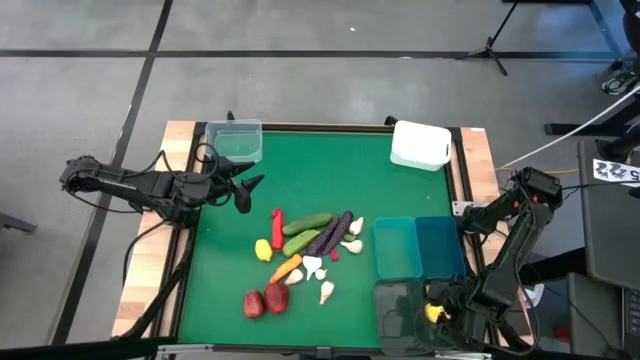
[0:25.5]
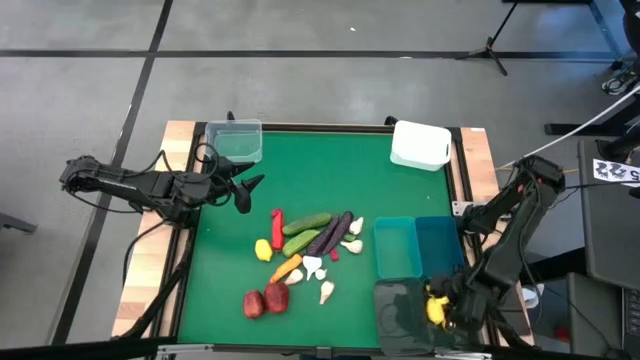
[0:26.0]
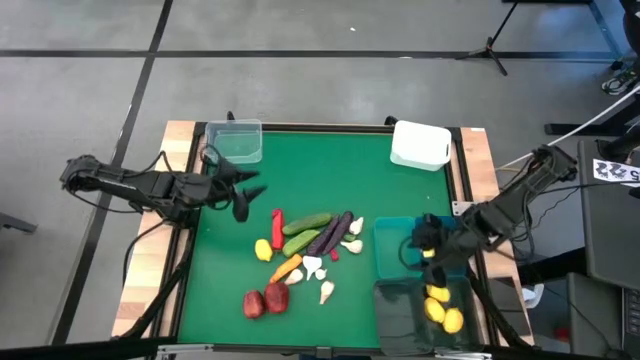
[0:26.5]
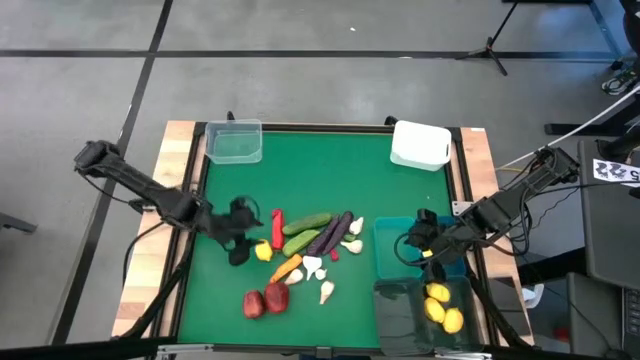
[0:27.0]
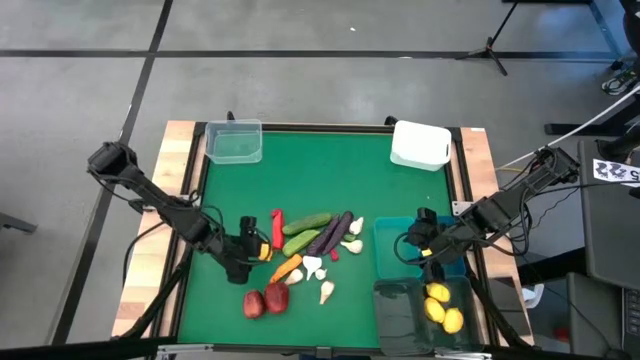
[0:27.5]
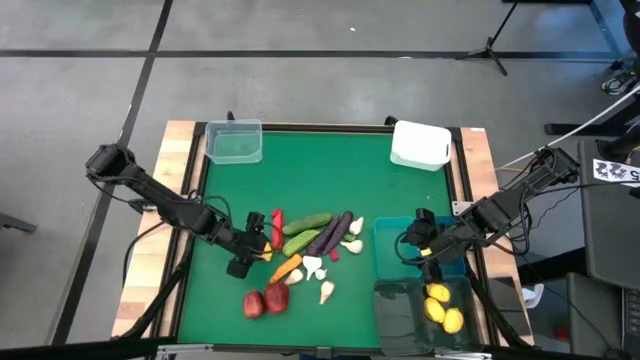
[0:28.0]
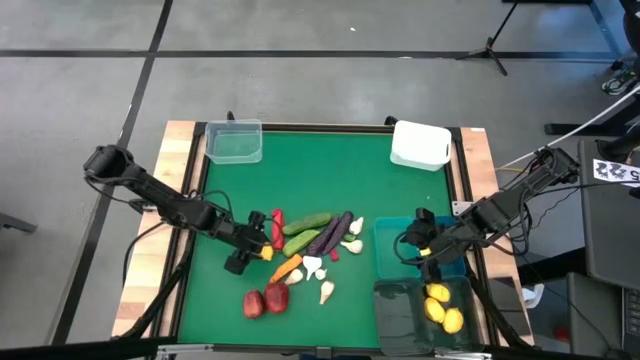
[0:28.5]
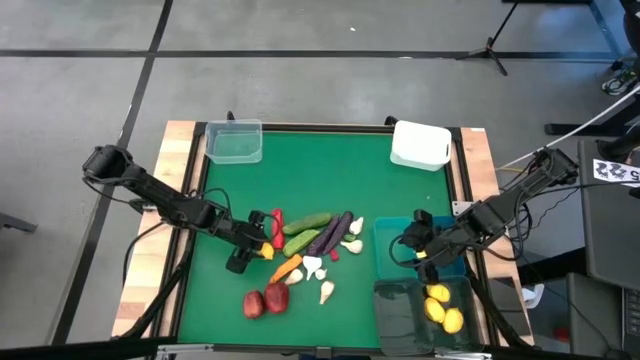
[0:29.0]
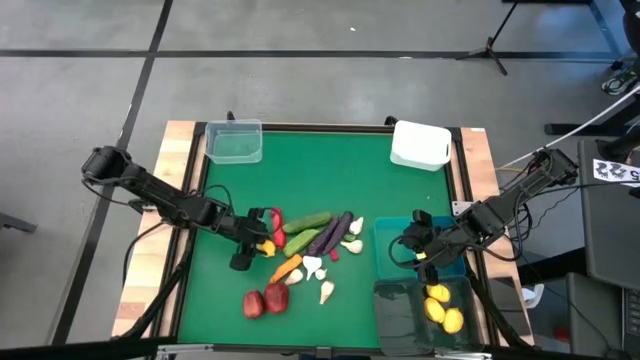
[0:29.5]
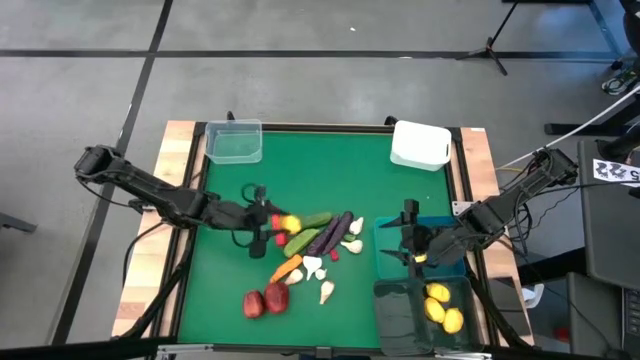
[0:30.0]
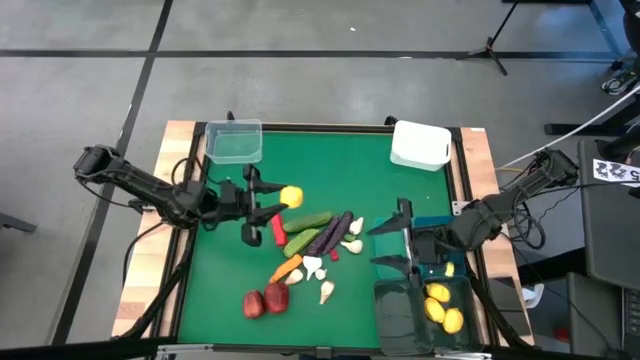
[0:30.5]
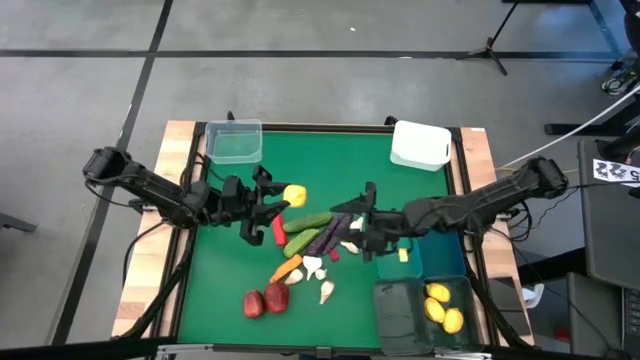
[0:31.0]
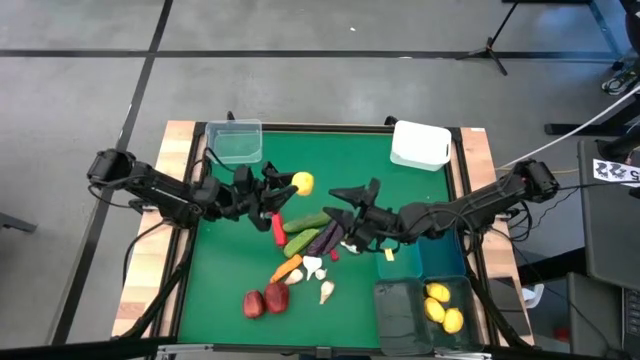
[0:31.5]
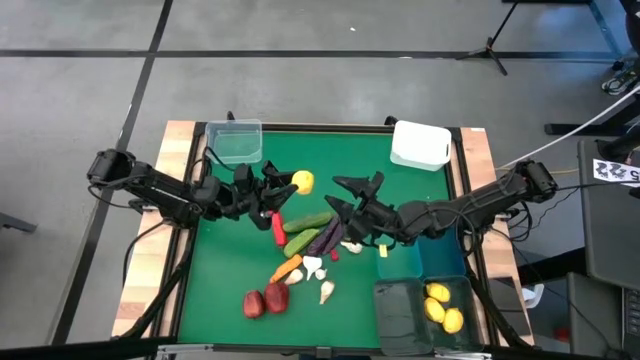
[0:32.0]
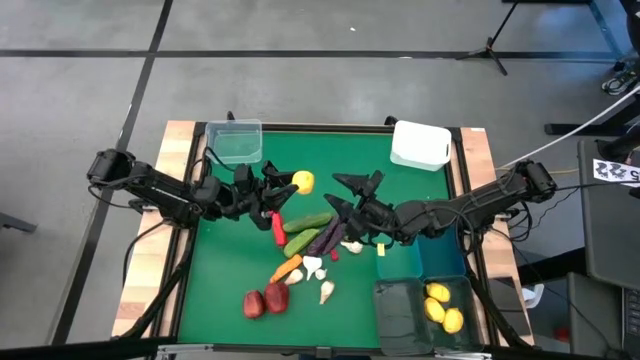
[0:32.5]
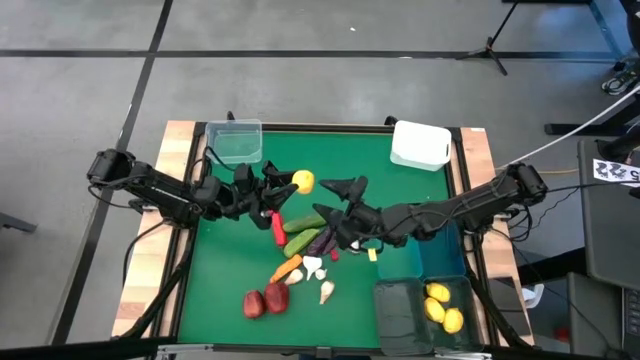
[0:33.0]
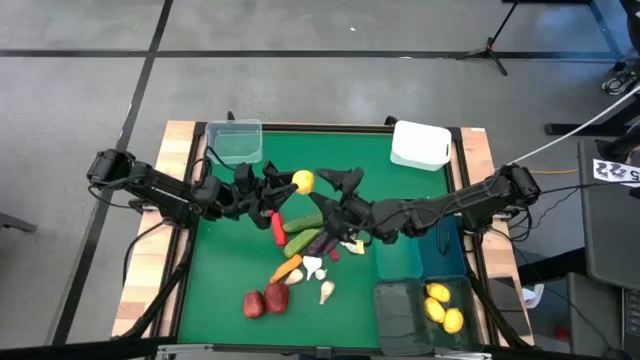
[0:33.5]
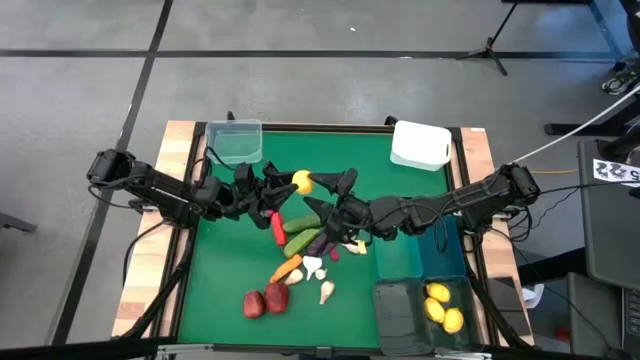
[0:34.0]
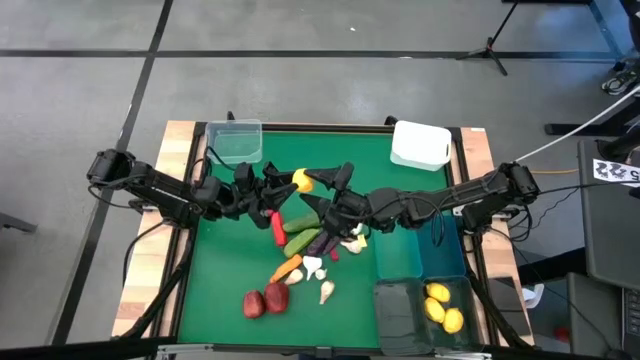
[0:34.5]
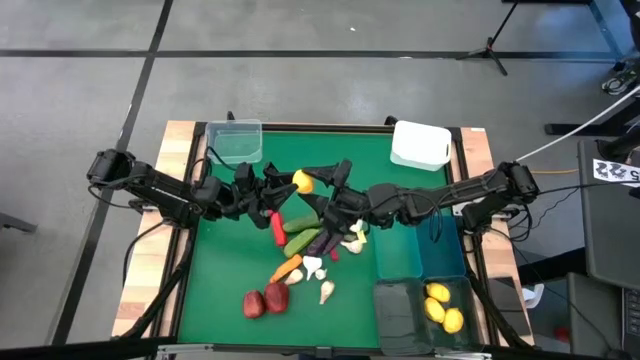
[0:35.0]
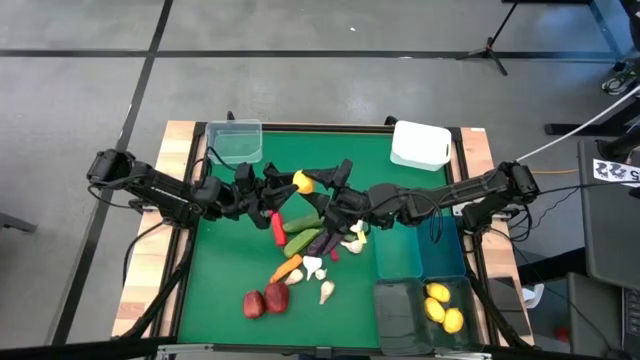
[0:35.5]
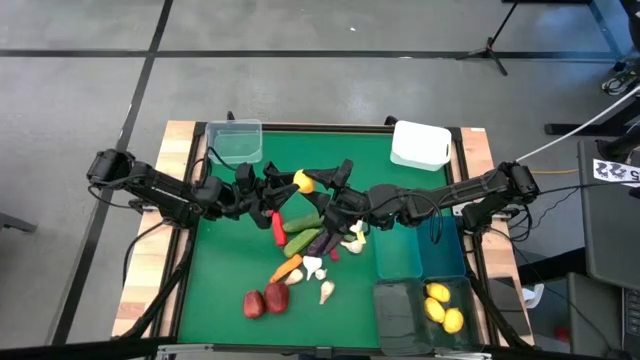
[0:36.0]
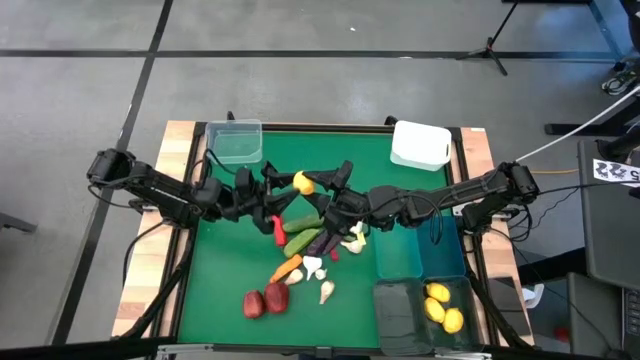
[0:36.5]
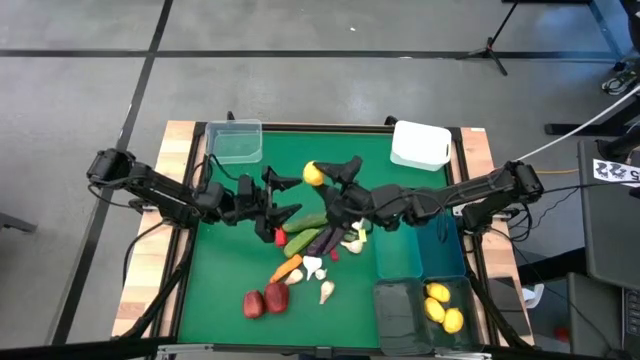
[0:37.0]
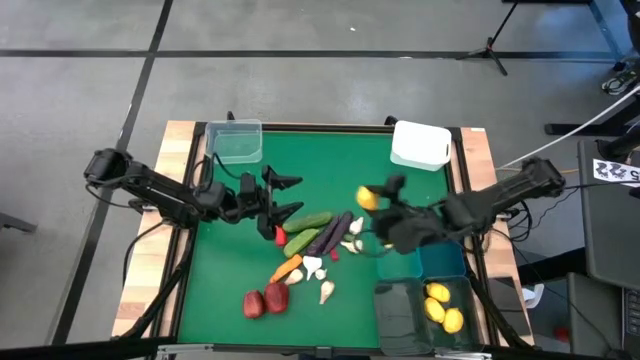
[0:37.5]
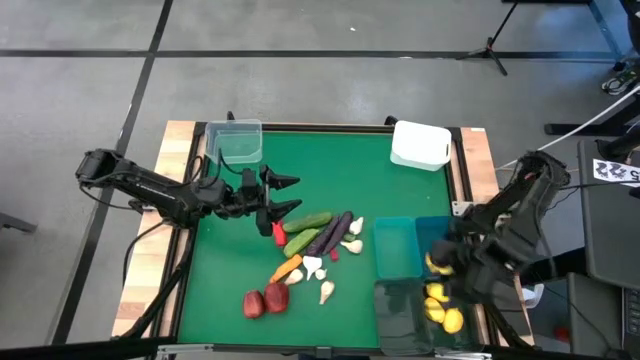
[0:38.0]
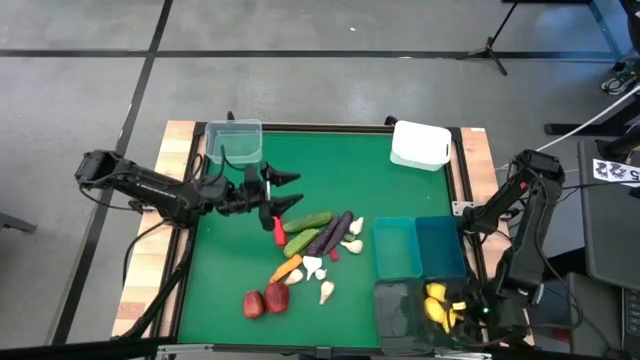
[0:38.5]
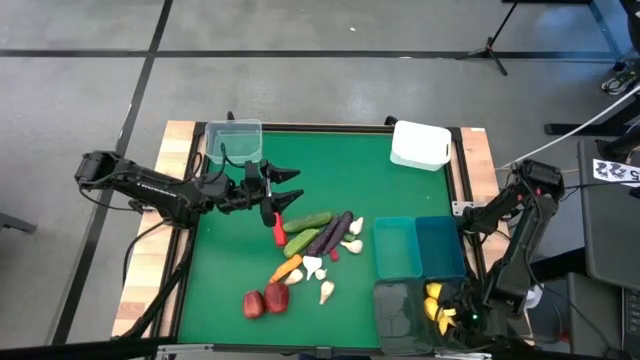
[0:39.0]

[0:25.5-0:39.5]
Task: Sort produce into baskets
Put the lemon into the right black bin

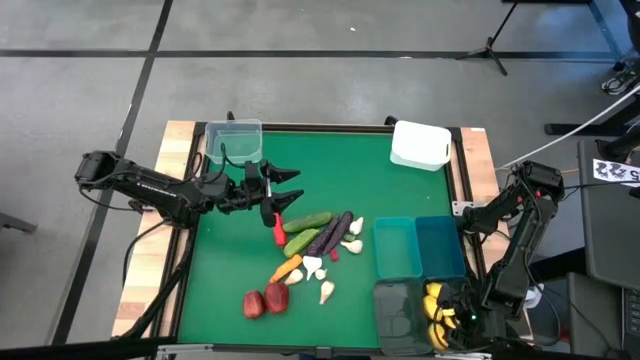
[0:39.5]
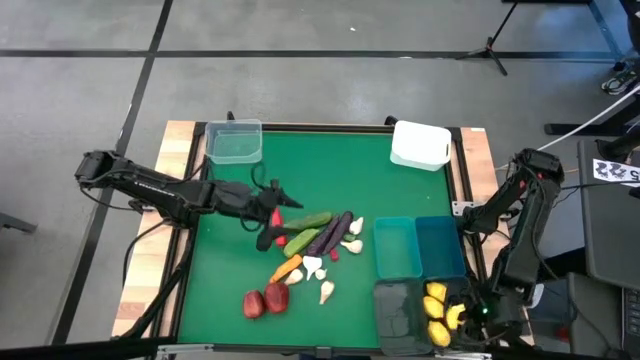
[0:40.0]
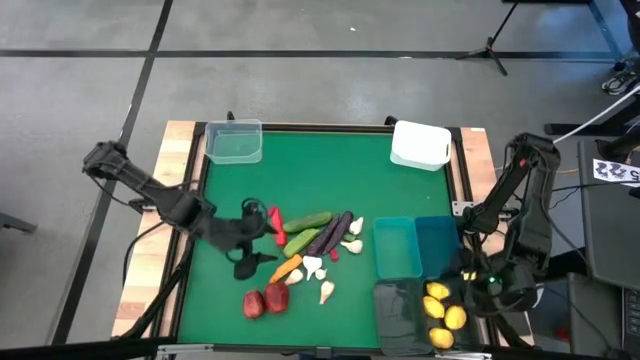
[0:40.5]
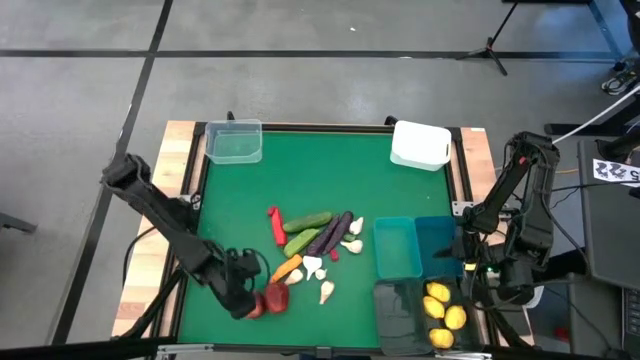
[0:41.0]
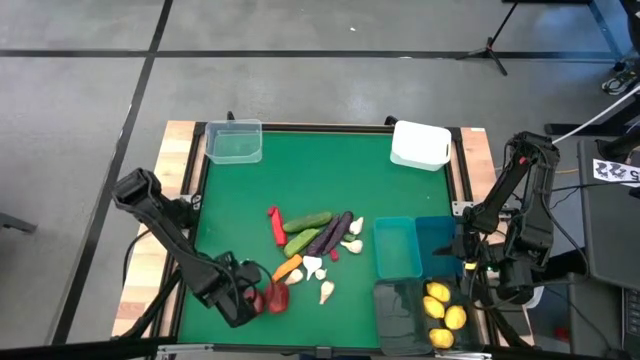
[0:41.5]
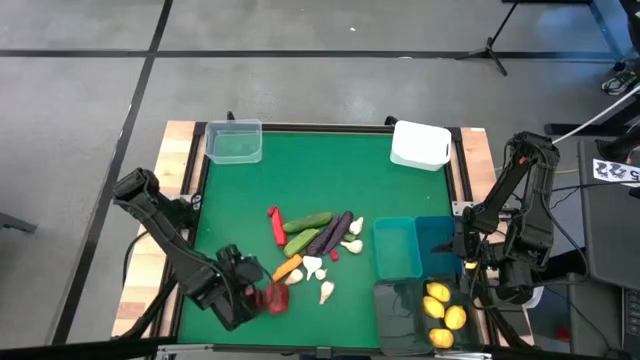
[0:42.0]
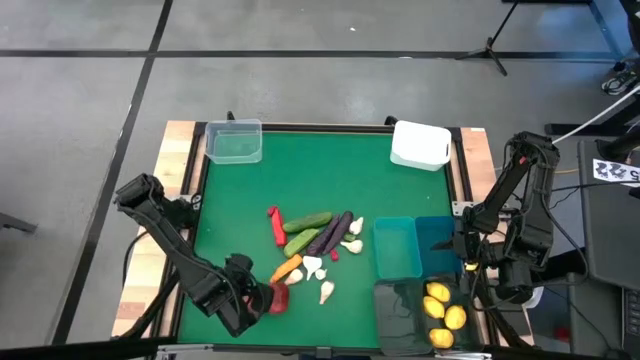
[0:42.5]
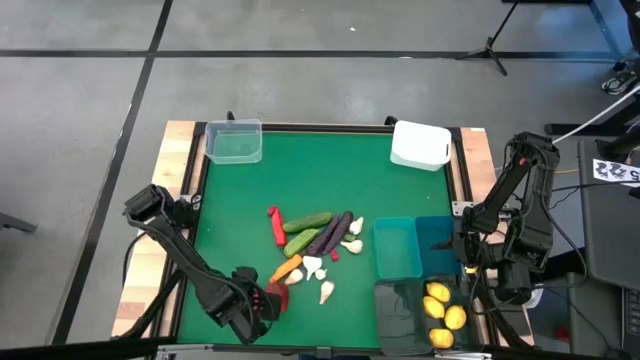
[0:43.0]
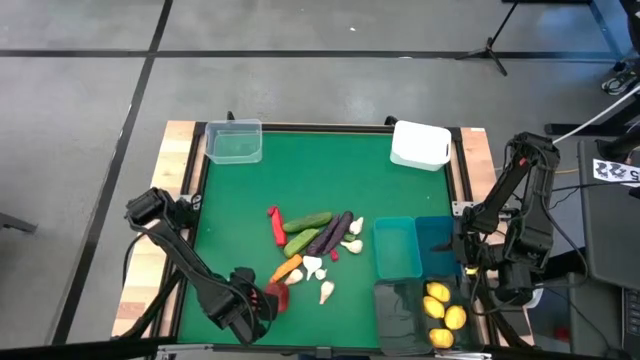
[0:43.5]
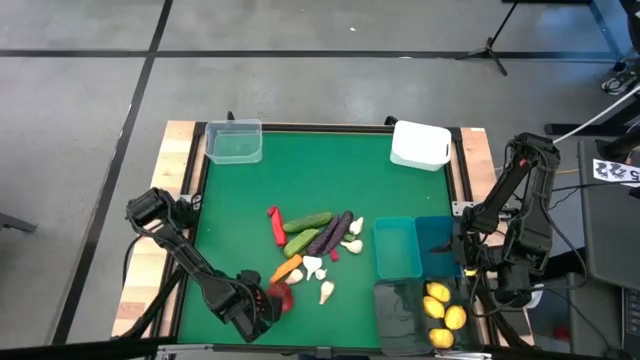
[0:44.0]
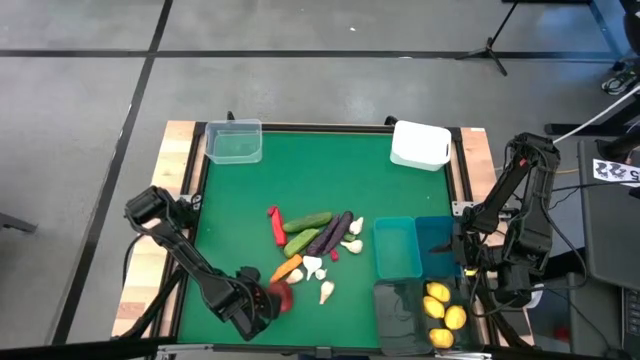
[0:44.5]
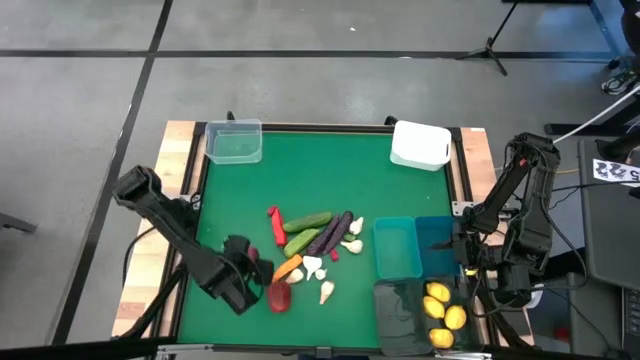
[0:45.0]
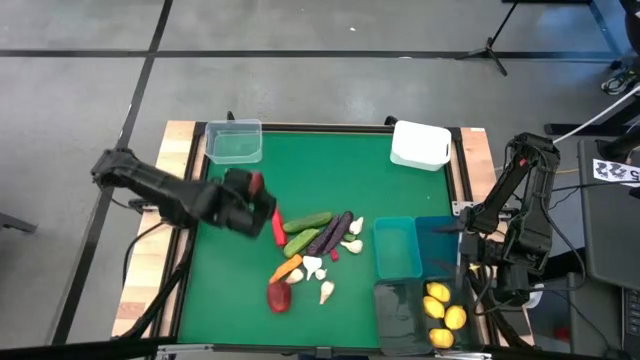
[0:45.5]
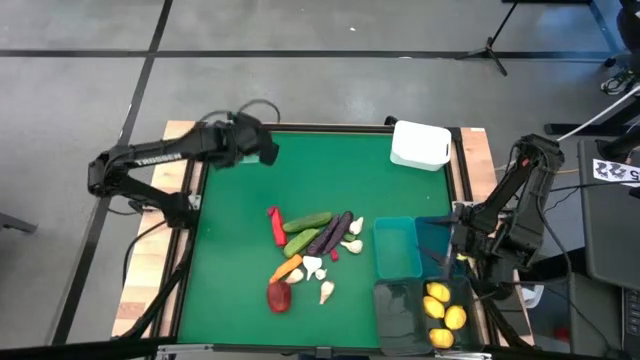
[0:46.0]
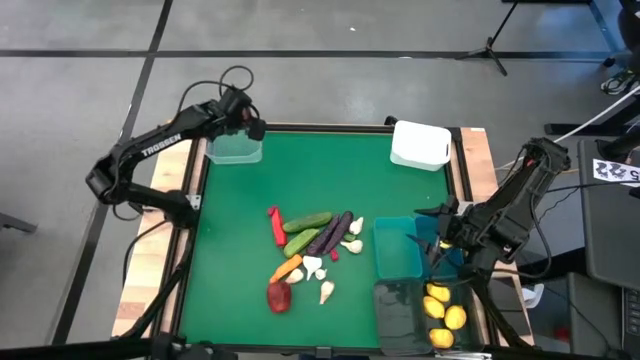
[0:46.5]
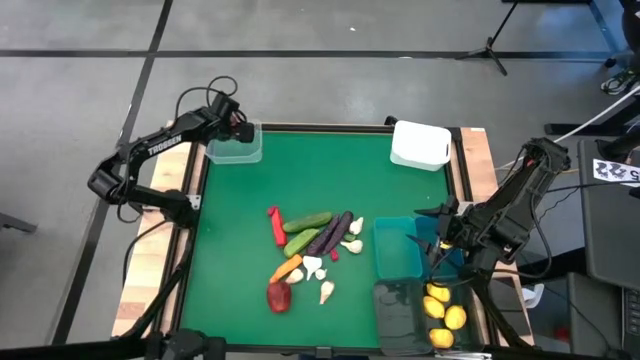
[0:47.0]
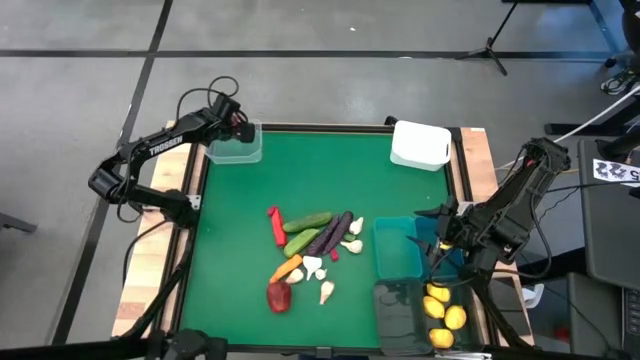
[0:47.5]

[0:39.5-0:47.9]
Put the apple into the transparent bin
